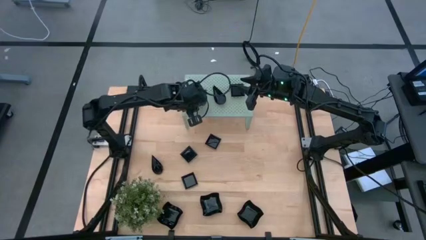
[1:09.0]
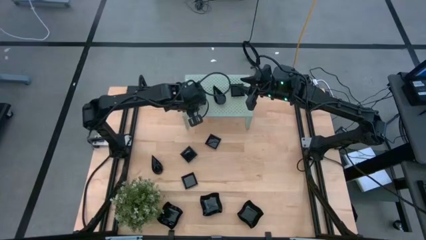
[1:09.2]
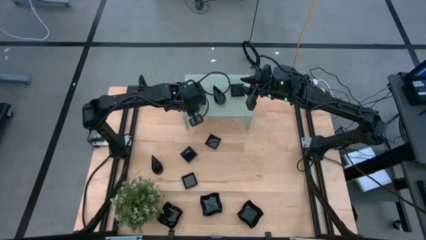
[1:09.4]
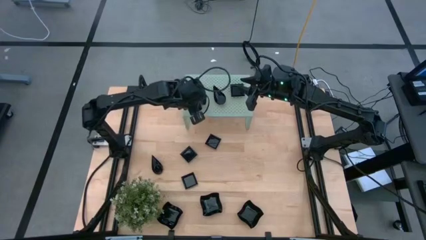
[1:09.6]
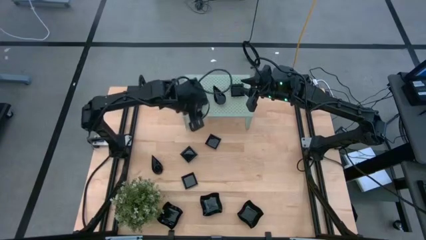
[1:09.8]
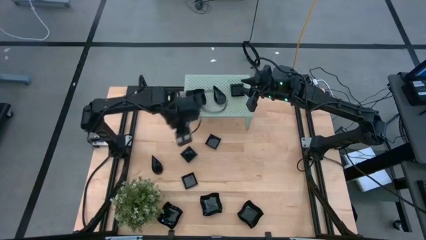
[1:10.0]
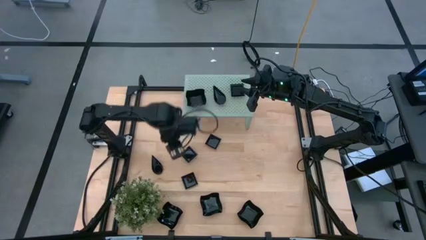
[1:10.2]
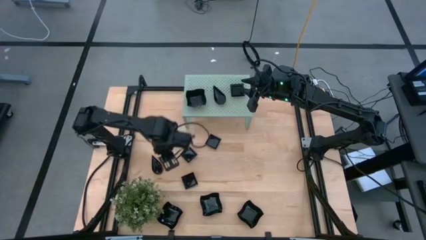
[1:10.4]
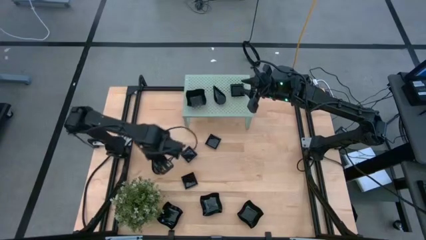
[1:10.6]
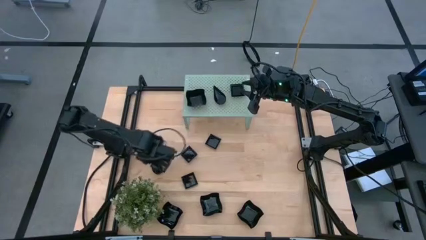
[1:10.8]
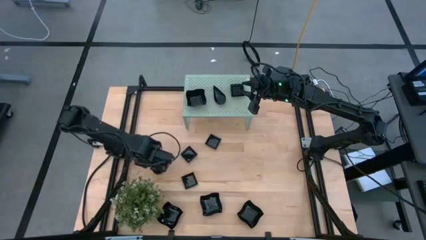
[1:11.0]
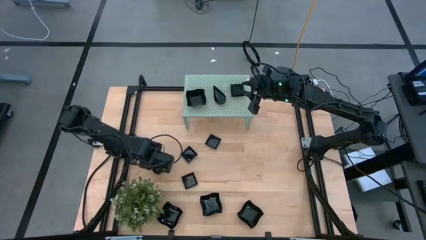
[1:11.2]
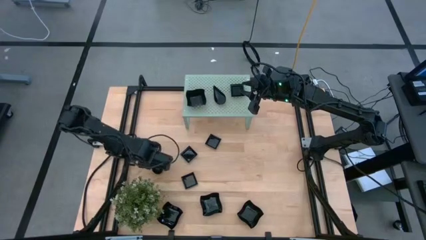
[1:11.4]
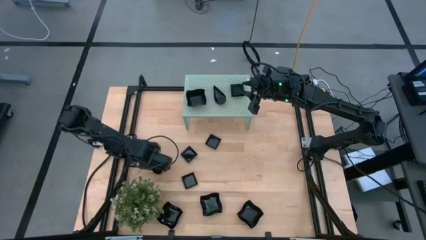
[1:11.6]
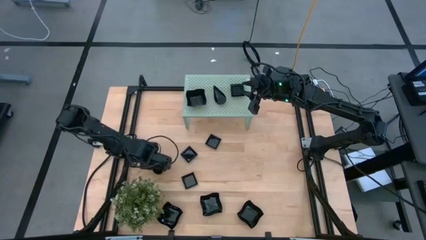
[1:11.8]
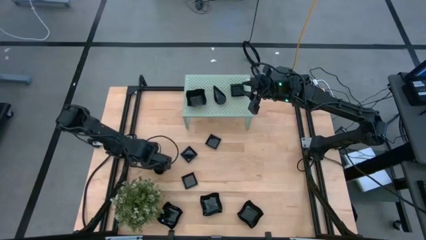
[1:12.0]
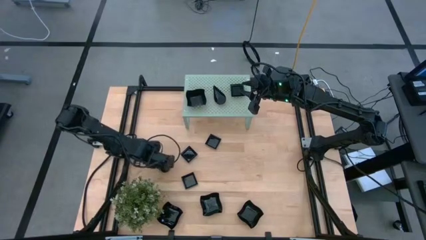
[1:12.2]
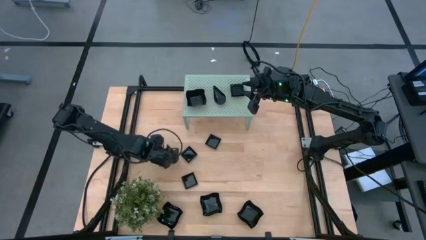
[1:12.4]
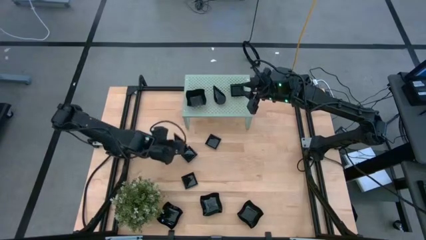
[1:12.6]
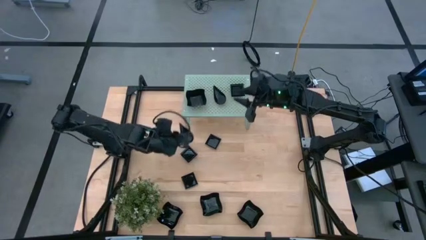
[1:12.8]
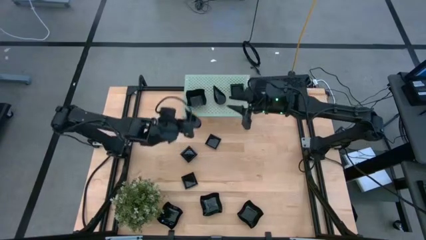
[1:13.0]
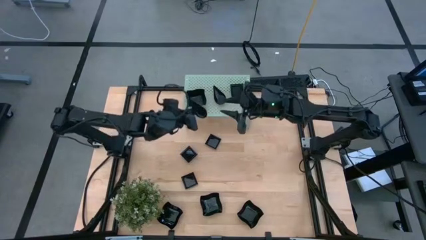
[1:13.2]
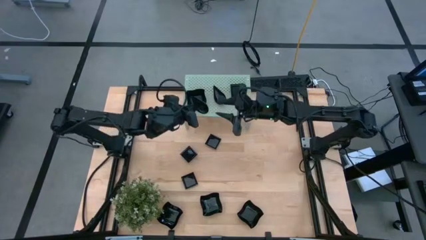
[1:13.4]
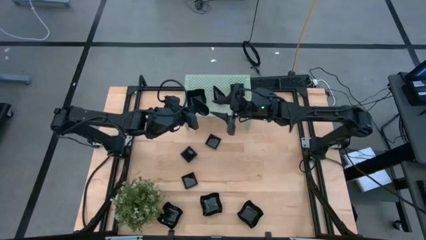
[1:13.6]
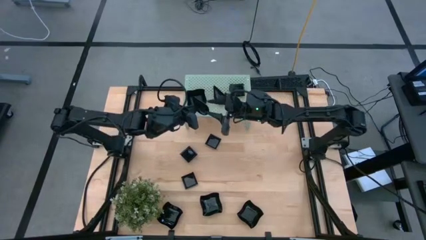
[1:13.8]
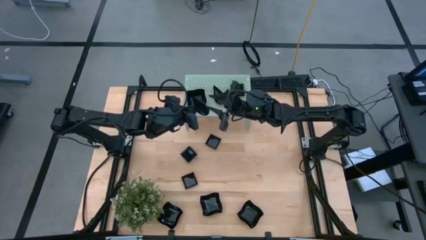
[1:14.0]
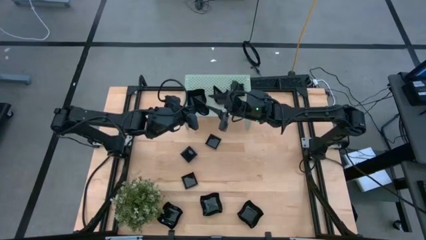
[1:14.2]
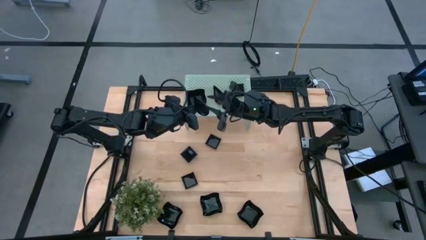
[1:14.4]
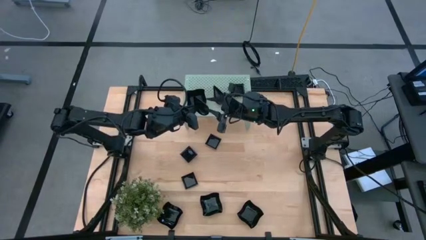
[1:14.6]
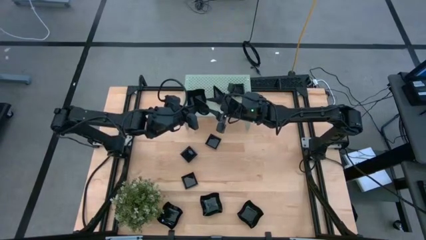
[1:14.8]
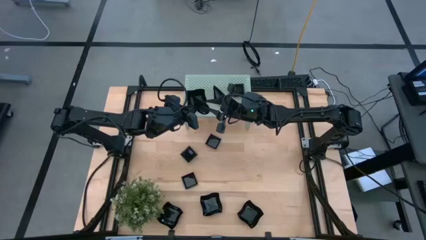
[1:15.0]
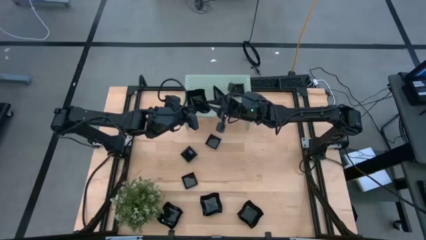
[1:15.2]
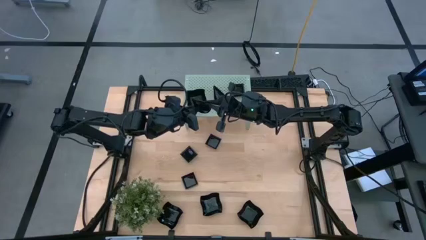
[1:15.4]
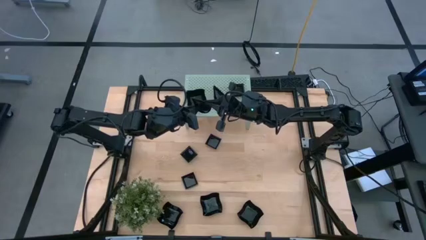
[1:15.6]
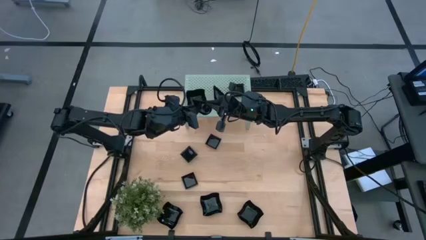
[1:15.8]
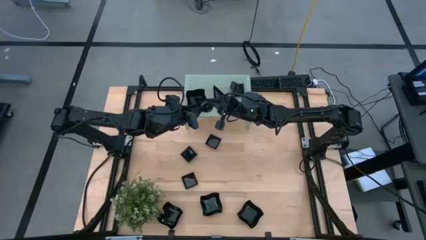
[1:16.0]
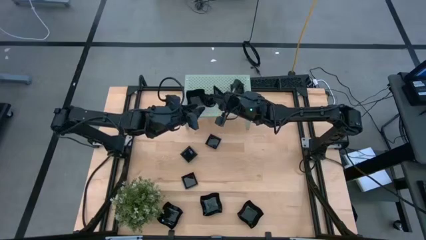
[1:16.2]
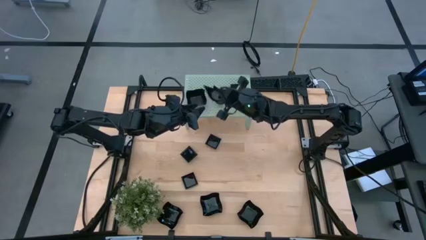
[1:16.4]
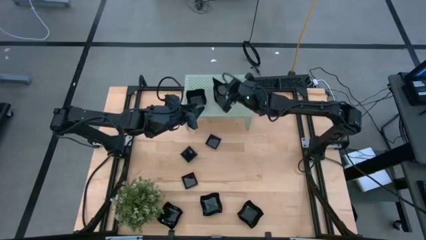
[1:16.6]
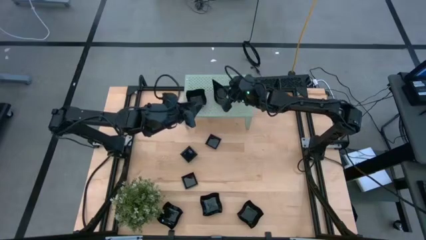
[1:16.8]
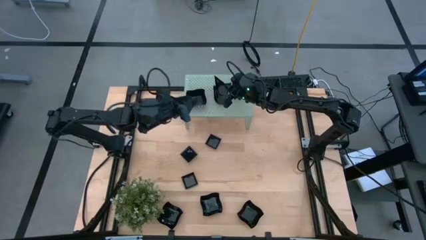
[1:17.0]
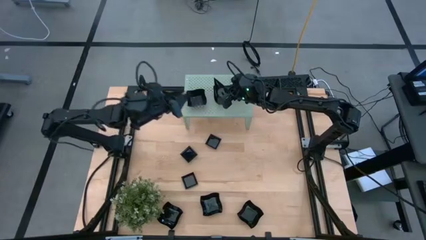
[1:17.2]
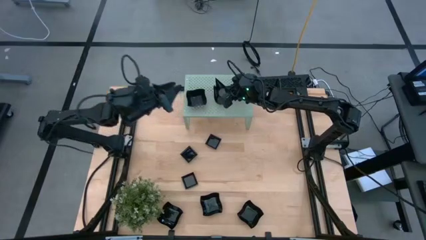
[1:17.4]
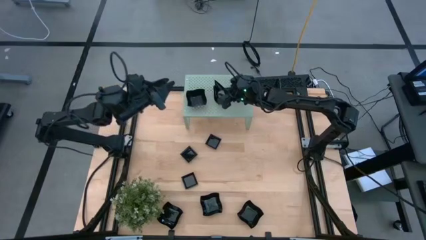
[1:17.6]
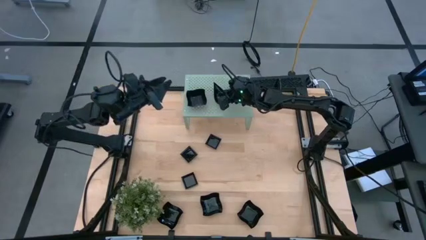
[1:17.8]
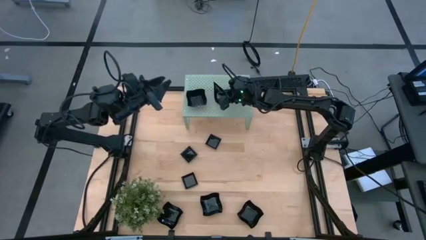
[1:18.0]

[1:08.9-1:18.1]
Task: Pick & Place Mini shaped plates
Stack the black drop-shaped plate on the shelf

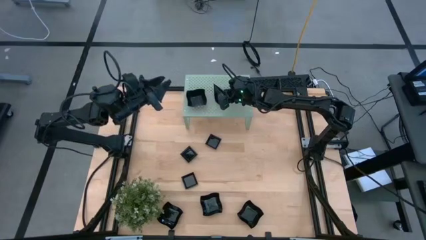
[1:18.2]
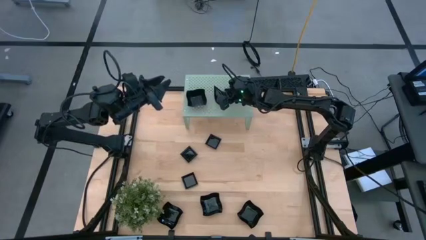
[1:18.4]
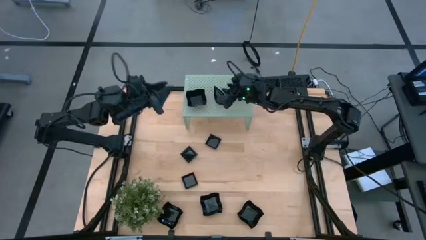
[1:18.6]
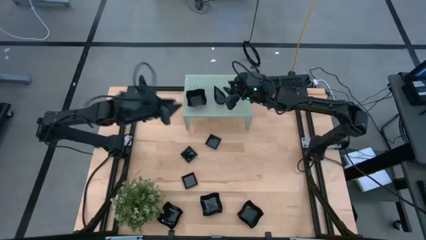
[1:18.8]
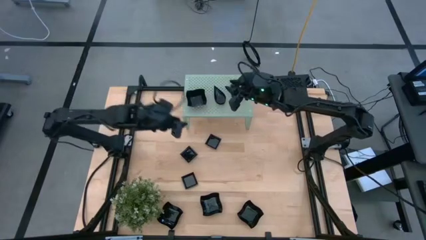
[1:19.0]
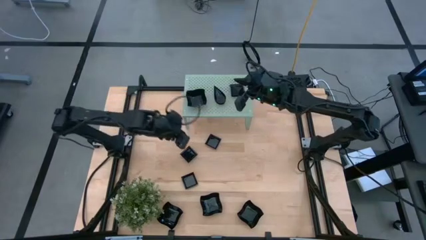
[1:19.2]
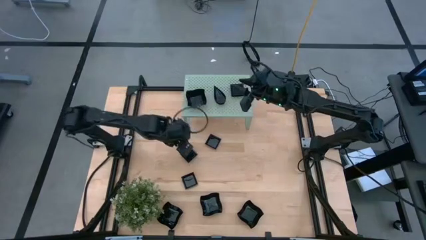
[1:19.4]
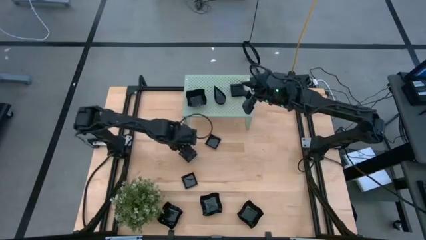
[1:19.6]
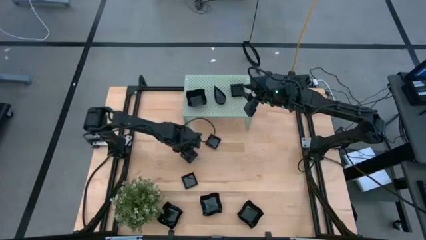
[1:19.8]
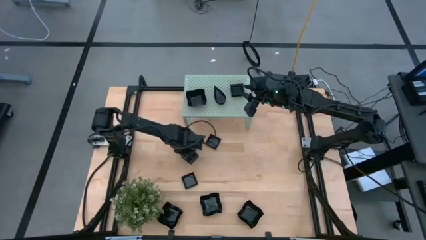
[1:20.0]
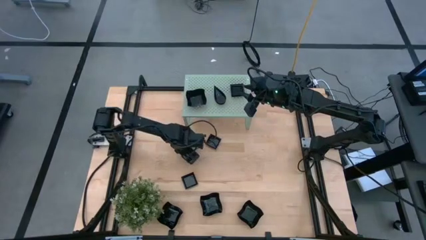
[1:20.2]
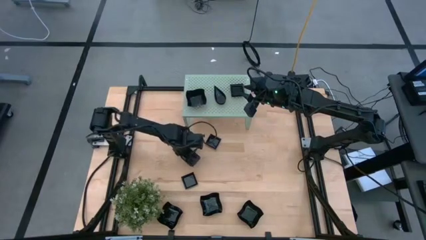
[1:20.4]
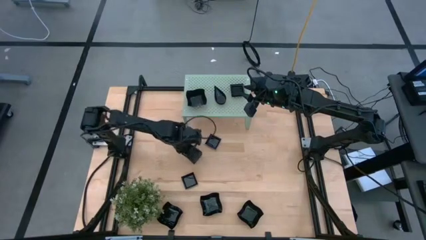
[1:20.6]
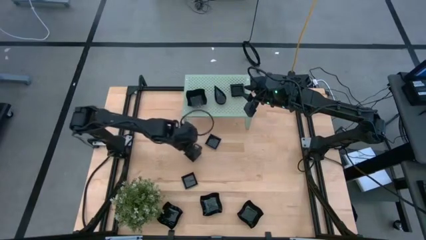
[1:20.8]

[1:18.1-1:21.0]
Stack the black square plate on the shelf

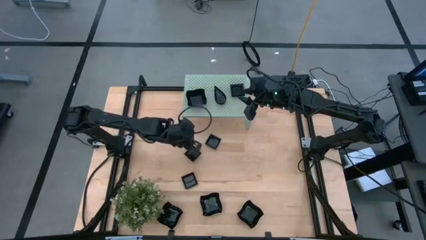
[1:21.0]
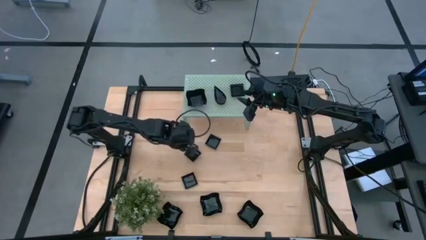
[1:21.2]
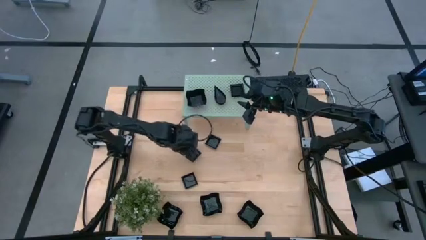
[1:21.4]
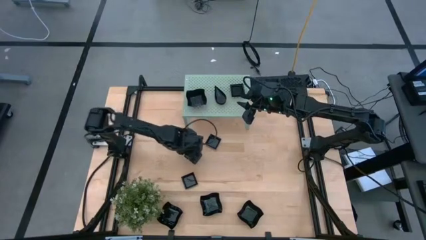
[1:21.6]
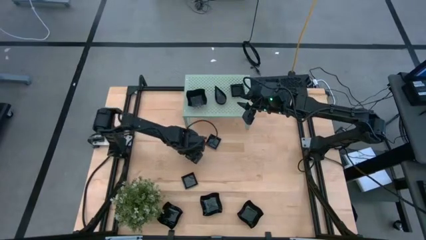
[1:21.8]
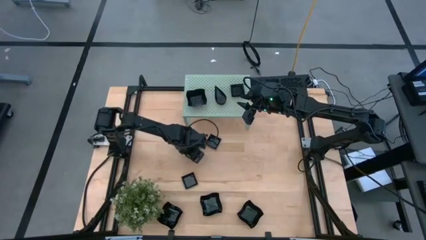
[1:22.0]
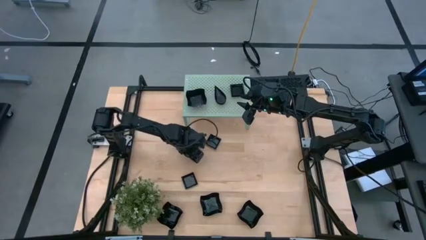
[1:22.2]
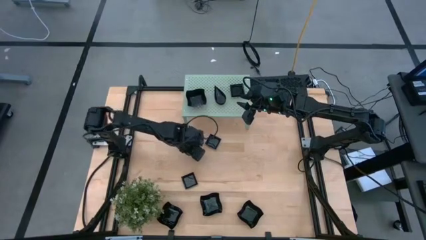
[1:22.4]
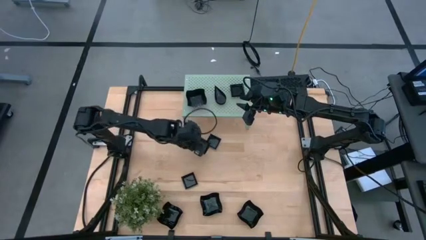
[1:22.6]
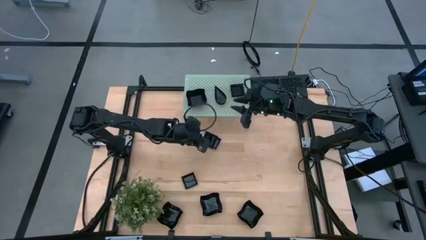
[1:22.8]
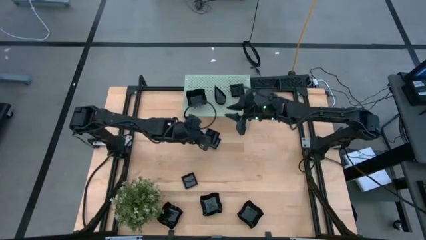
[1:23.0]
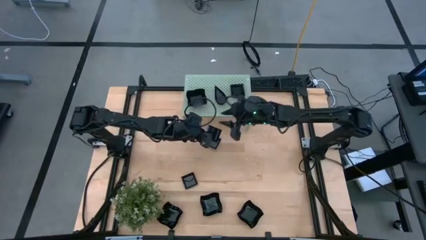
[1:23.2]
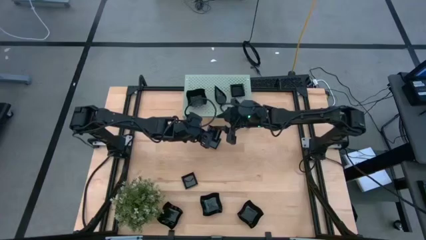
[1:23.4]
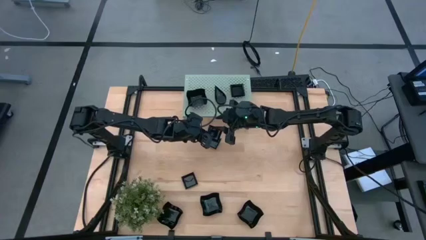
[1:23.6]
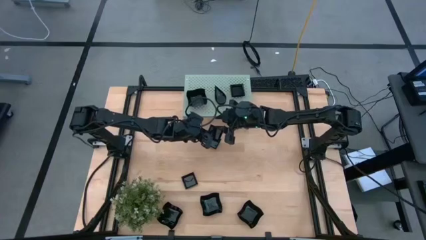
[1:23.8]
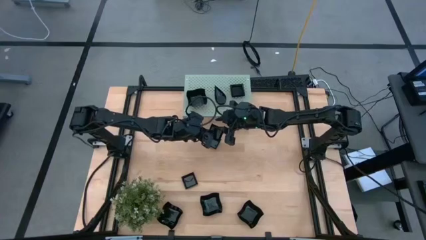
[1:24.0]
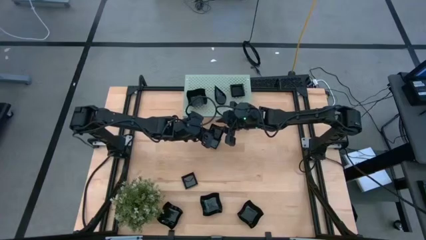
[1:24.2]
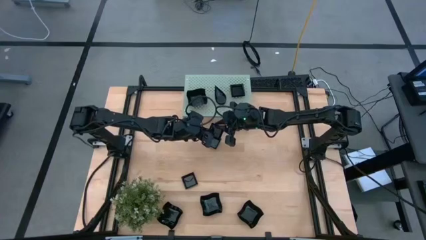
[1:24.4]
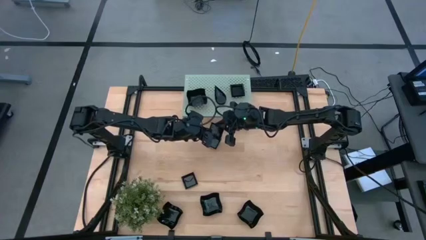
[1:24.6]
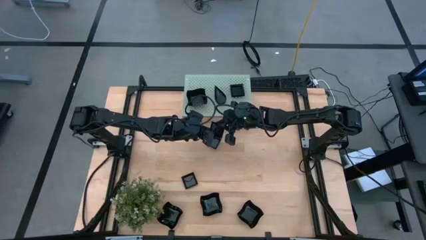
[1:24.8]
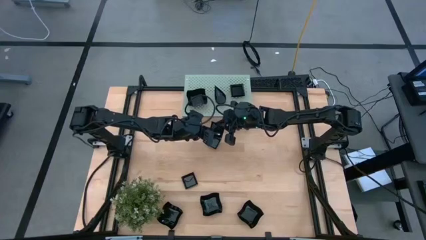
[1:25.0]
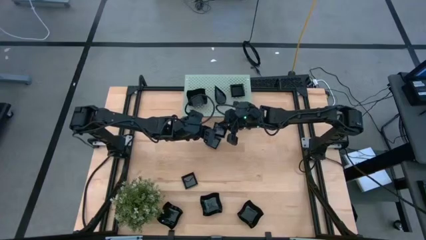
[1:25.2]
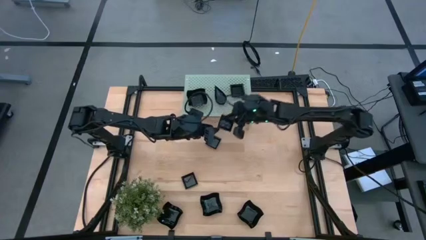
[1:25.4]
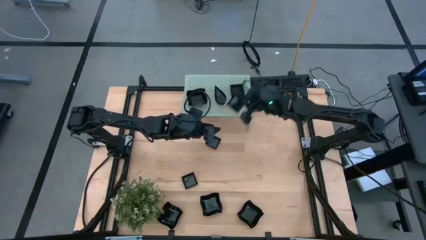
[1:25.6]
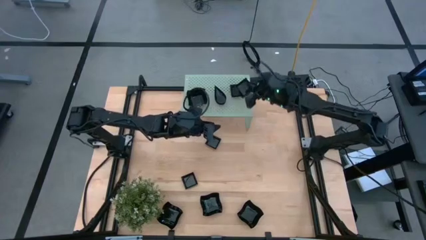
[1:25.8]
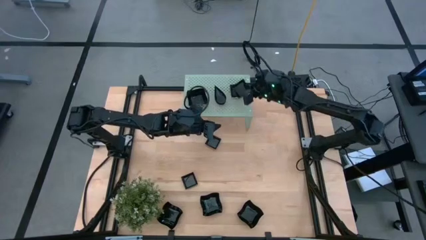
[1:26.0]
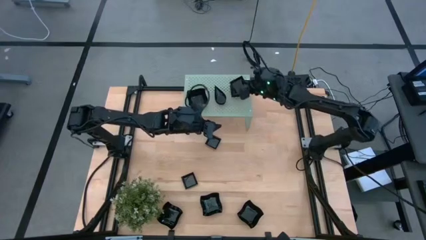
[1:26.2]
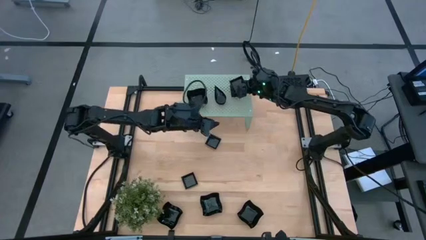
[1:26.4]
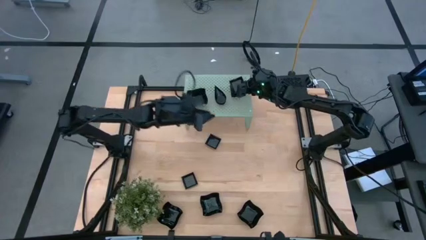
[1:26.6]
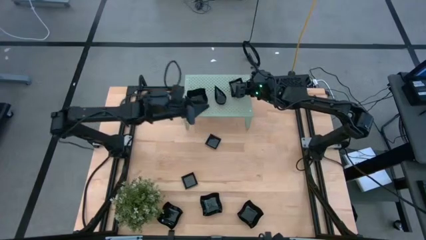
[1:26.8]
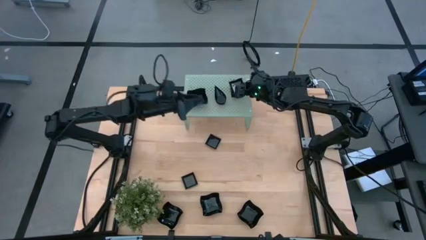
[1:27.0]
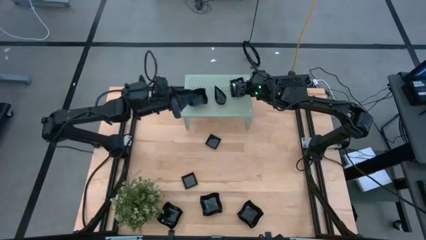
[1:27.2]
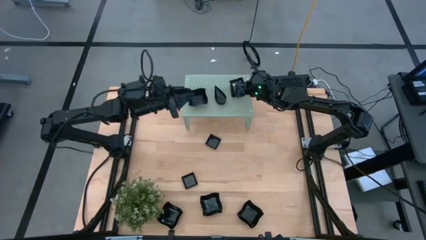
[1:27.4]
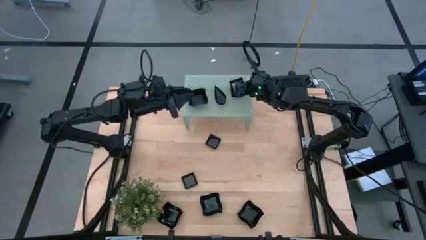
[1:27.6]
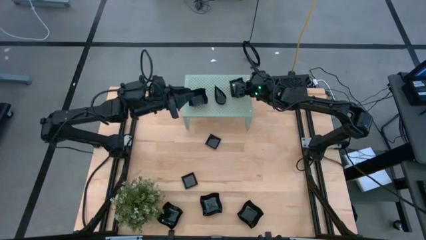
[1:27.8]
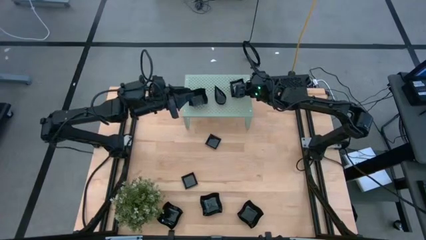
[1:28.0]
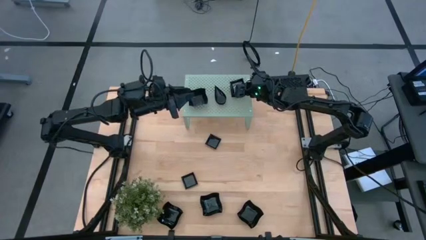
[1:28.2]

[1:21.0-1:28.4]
Stack the black square plate on the shelf
